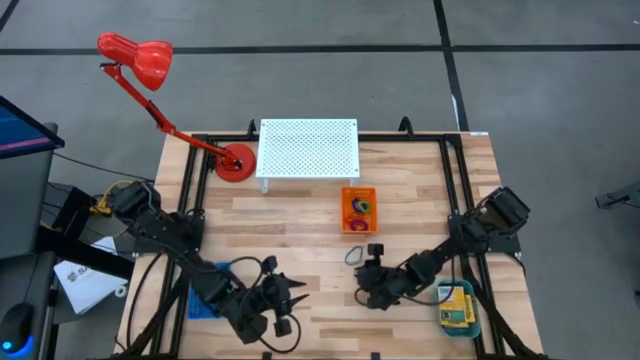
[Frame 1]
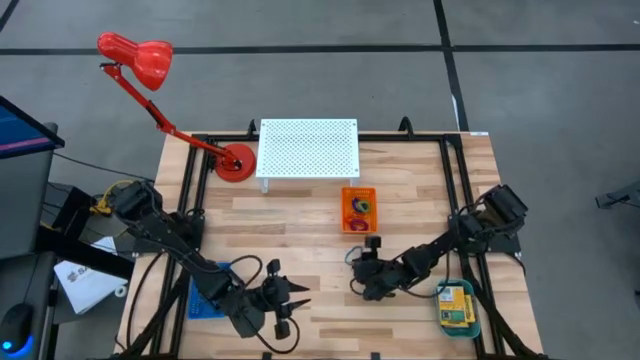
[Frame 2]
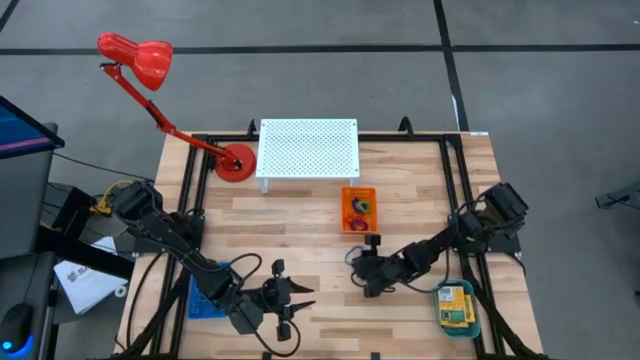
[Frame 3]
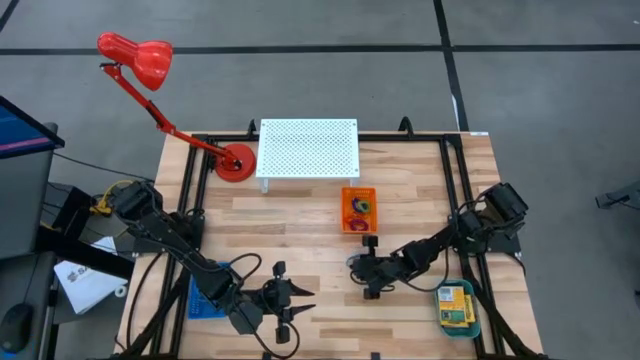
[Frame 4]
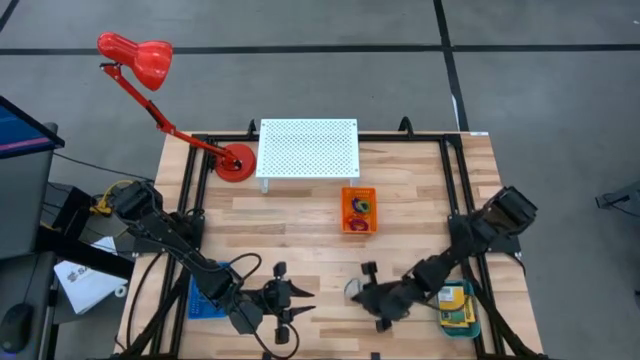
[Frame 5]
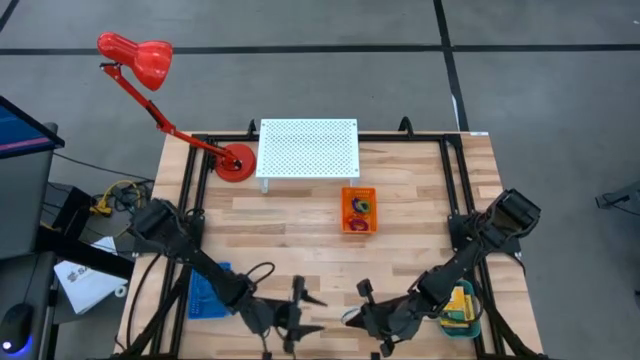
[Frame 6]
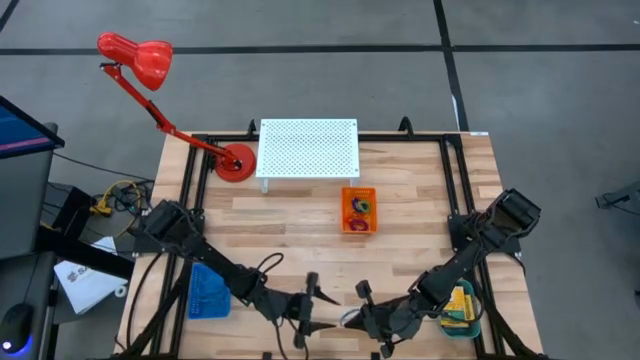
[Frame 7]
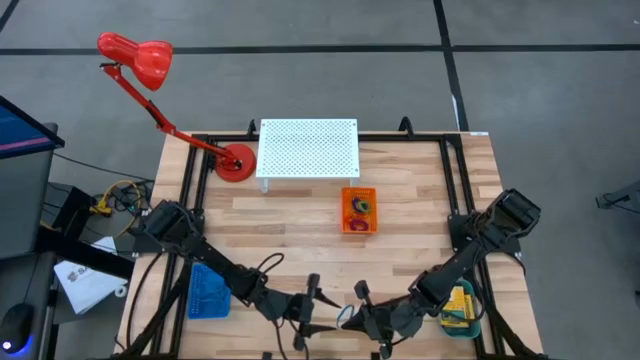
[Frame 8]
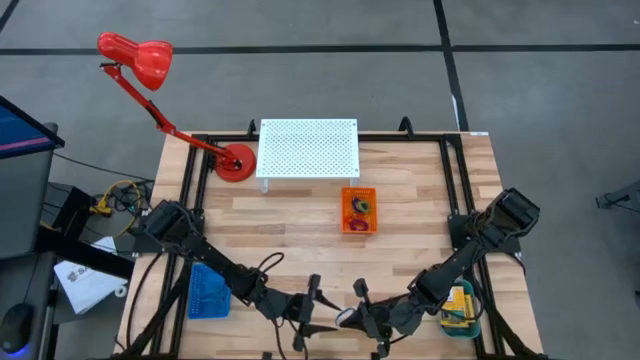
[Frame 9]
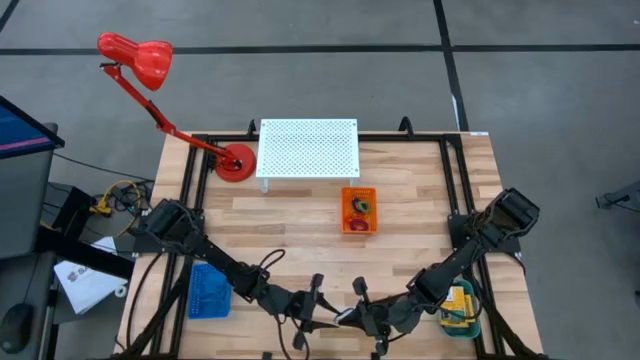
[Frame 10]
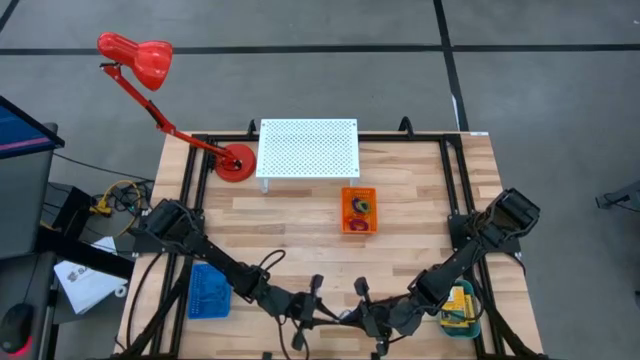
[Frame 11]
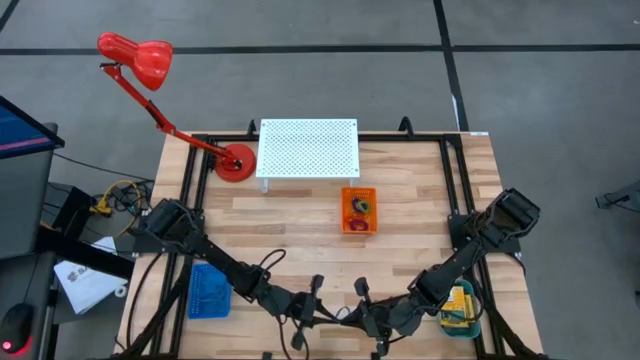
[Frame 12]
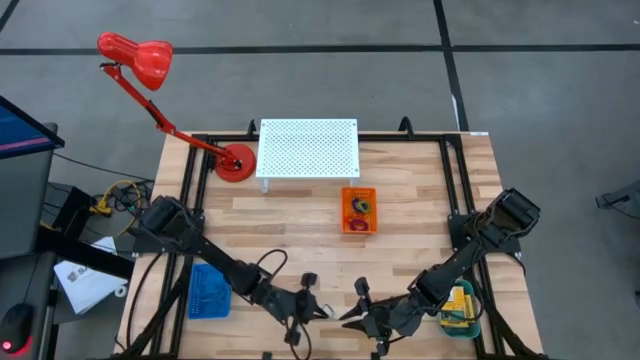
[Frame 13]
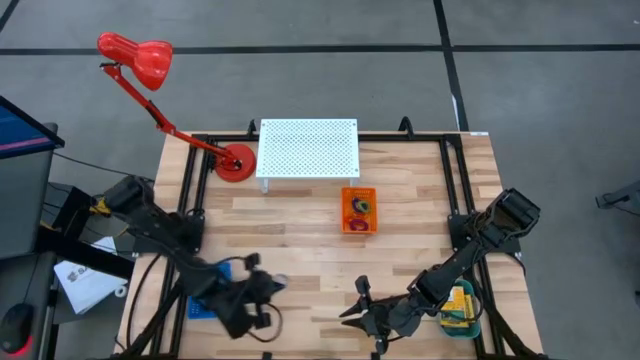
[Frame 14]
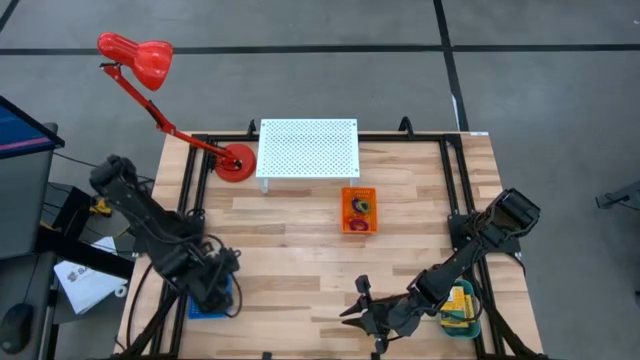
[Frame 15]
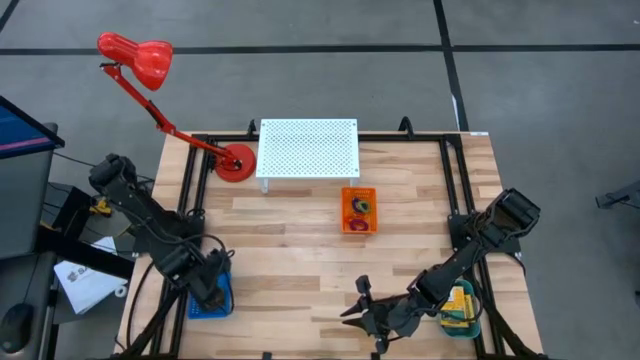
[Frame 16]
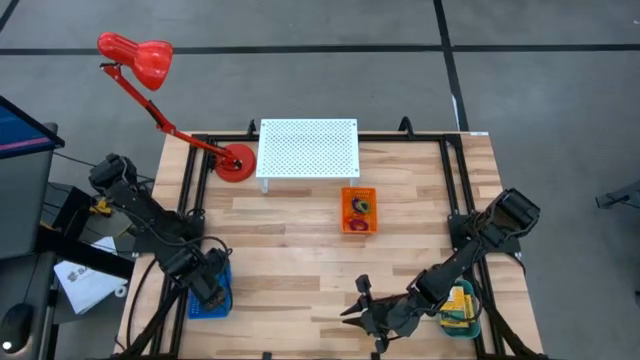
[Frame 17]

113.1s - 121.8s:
Task: Pick & Place Office Desk Supplies
Put the blue rubber band into the blue bin

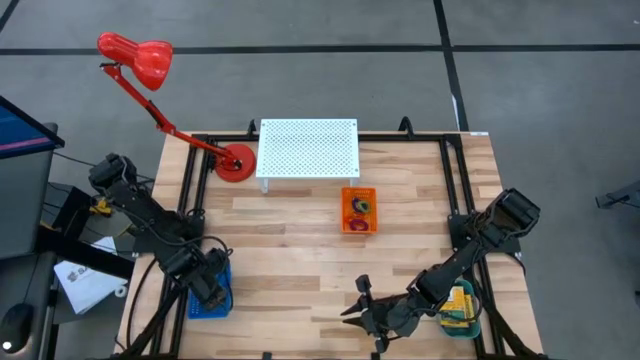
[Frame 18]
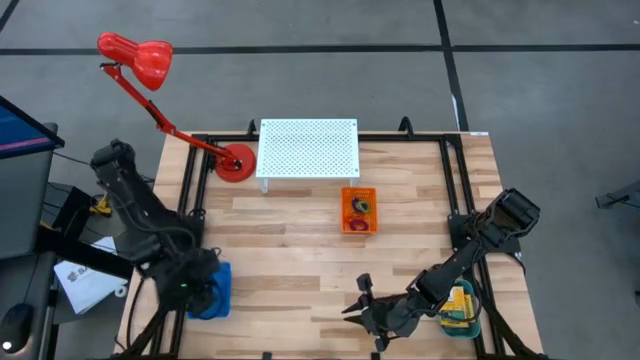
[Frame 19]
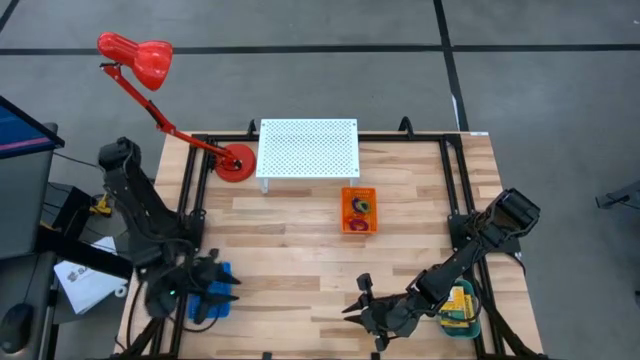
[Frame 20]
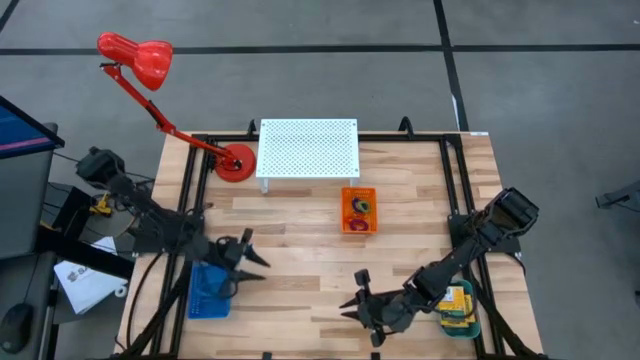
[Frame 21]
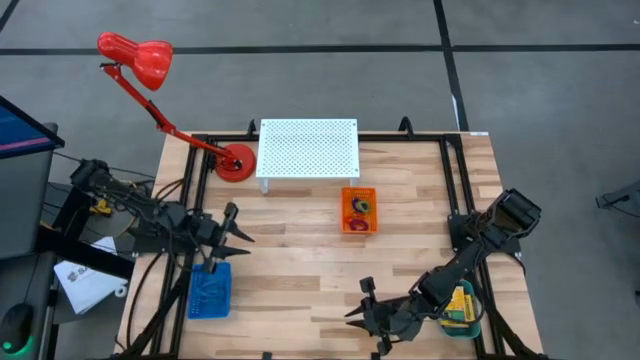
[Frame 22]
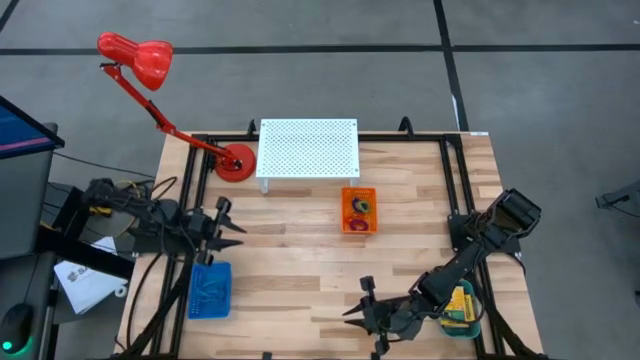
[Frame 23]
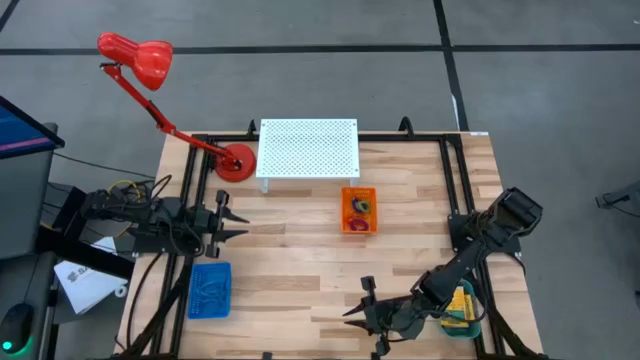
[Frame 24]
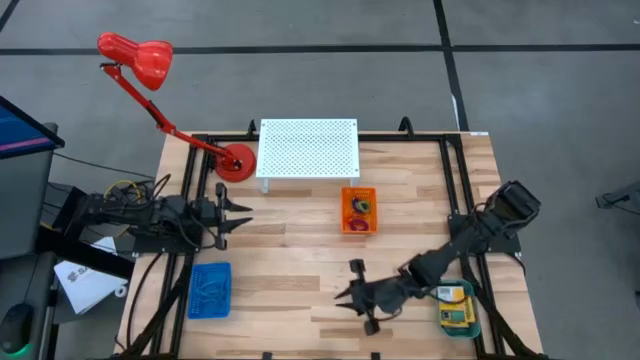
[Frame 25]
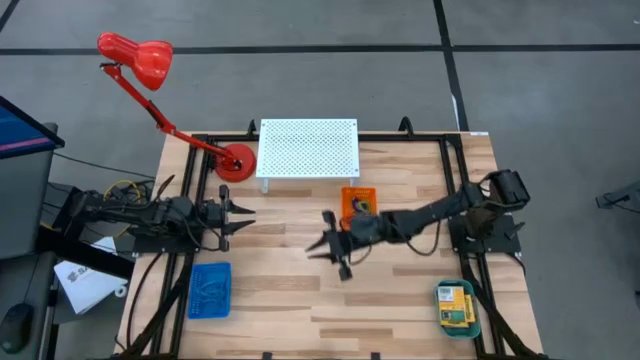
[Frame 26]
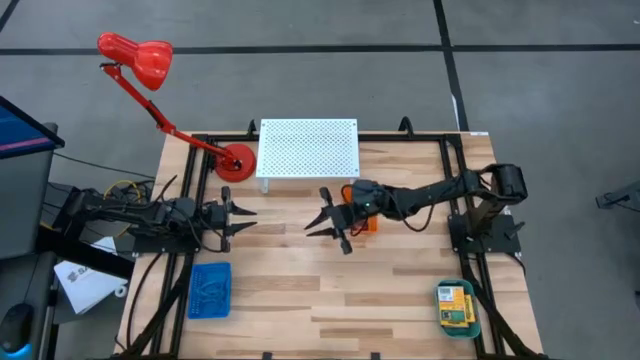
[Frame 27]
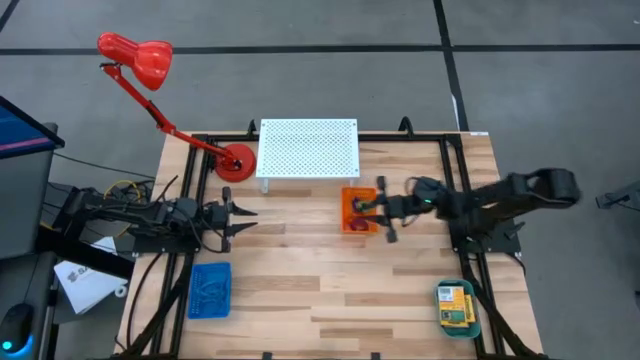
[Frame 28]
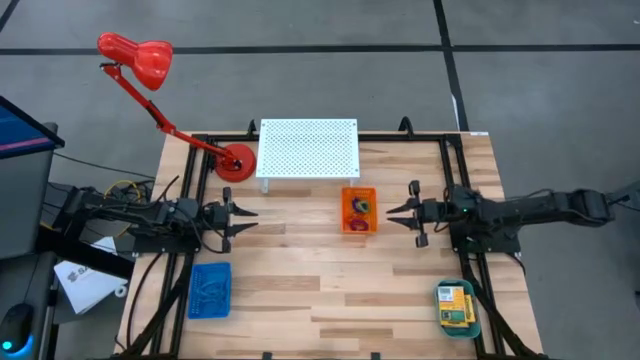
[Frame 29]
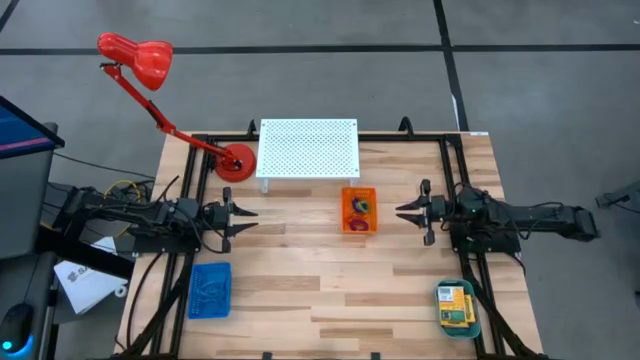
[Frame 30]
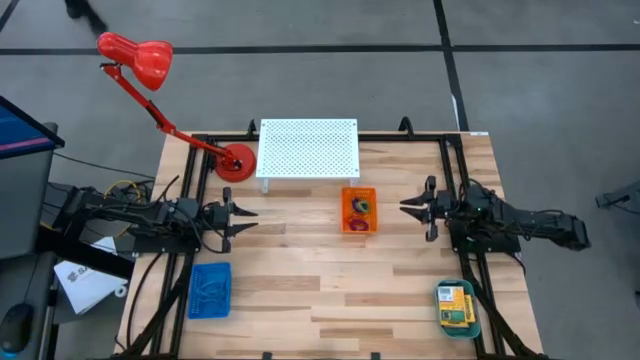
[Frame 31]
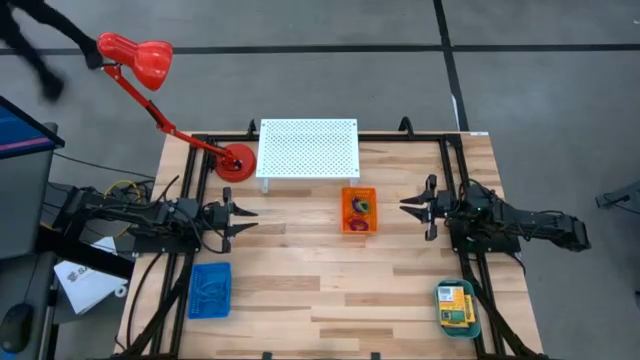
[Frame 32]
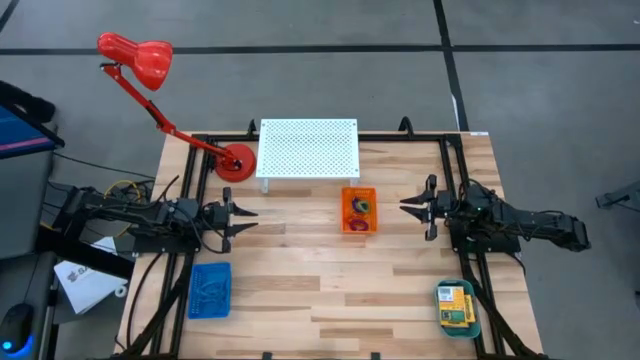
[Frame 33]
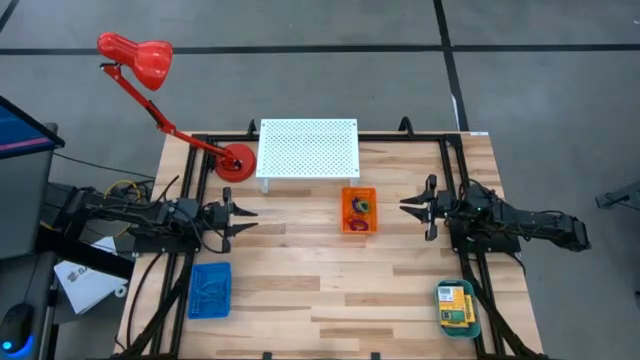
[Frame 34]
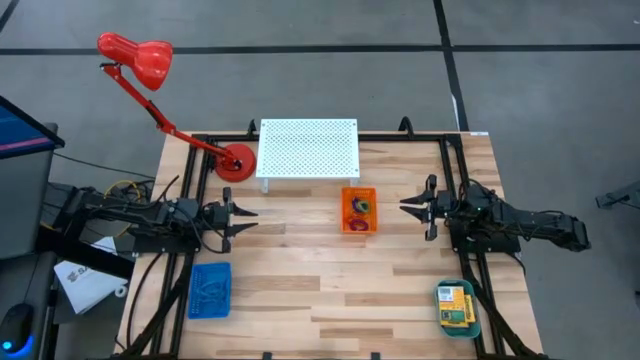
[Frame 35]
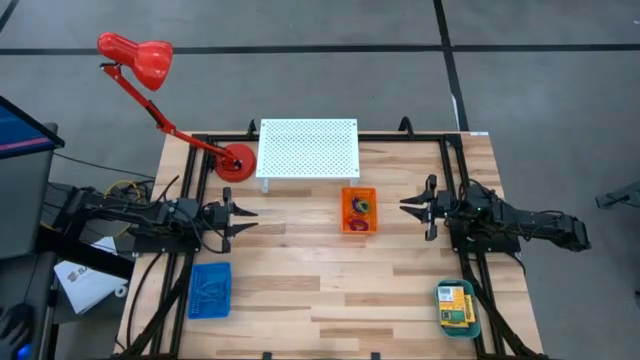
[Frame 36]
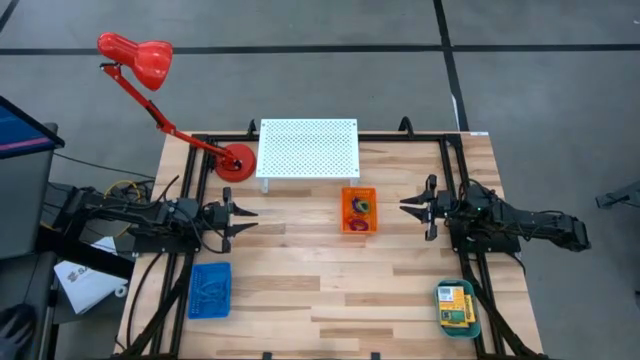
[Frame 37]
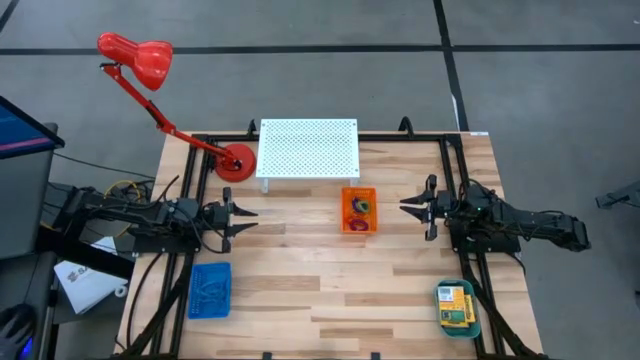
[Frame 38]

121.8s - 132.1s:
Return to Home Position

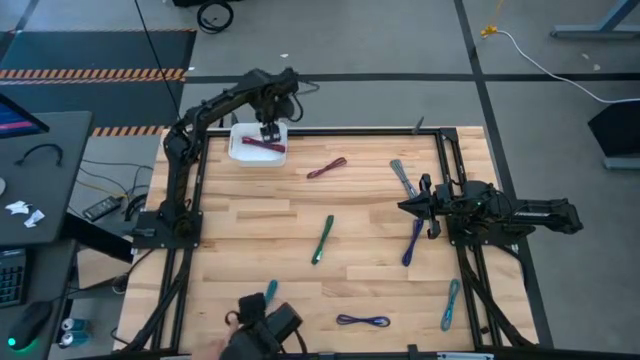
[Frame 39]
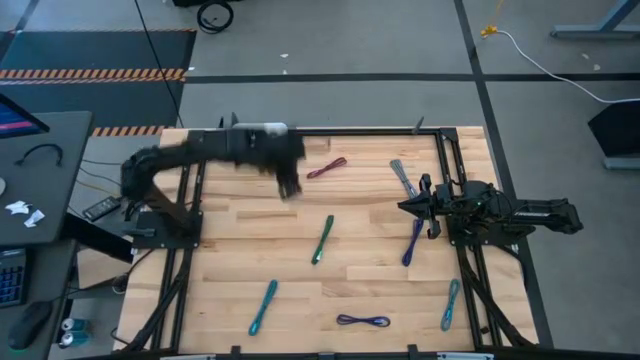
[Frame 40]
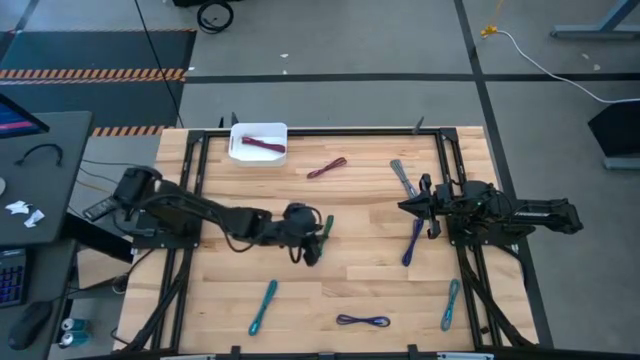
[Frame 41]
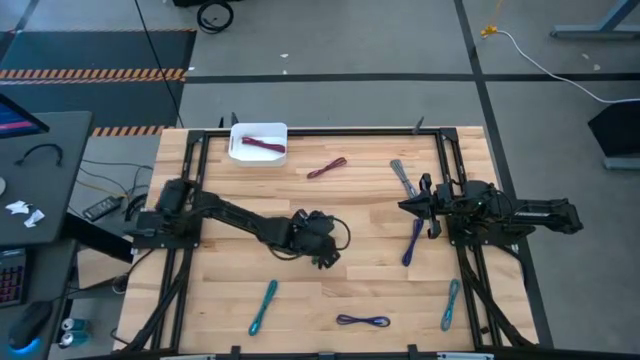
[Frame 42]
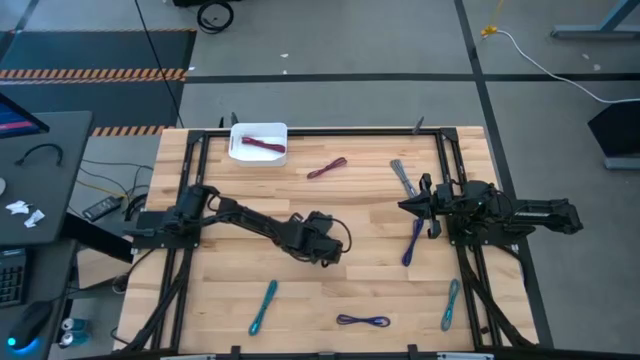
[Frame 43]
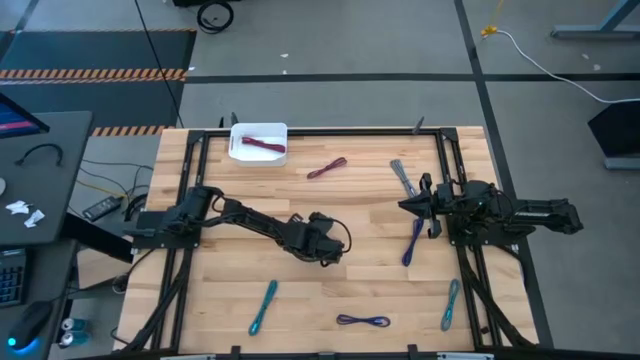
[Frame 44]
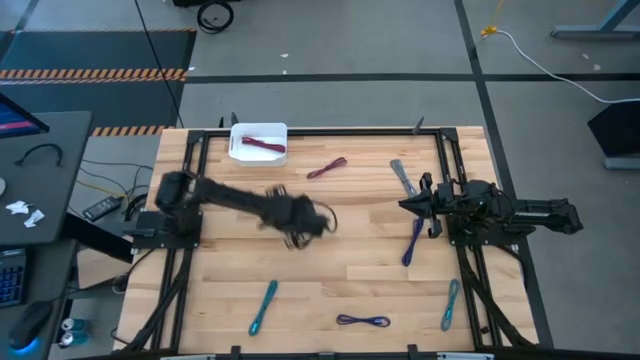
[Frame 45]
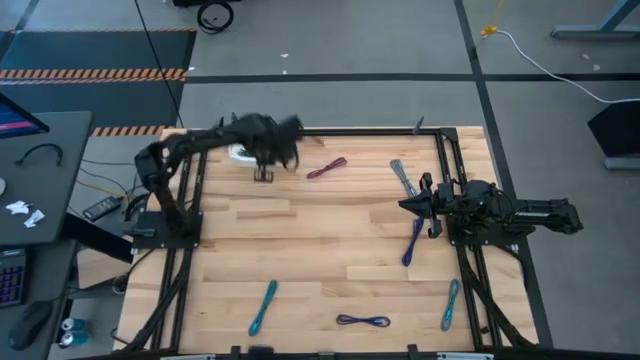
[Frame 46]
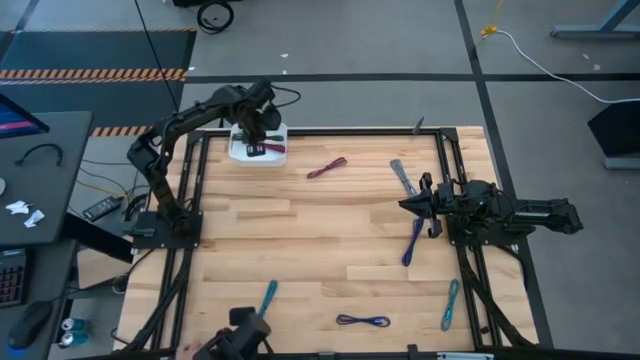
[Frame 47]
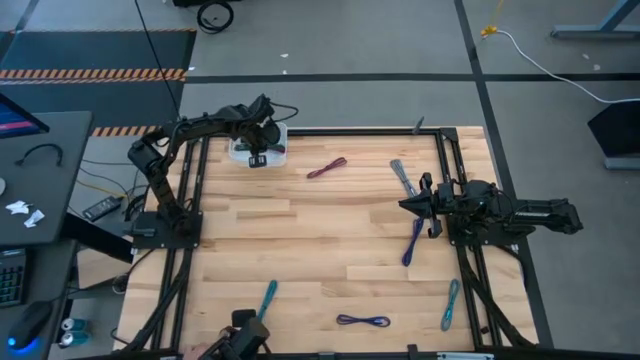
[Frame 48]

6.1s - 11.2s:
Task: Pick and place USB-C Cables
Put the green USB cable into the white bin
